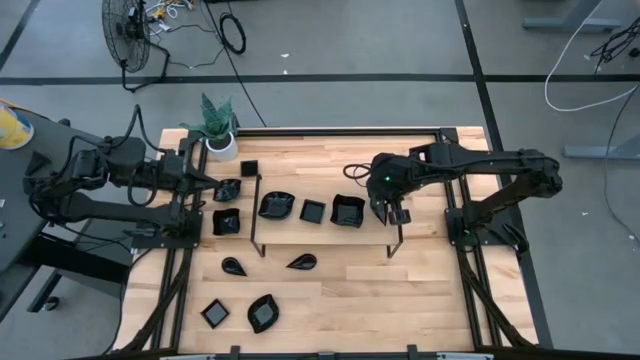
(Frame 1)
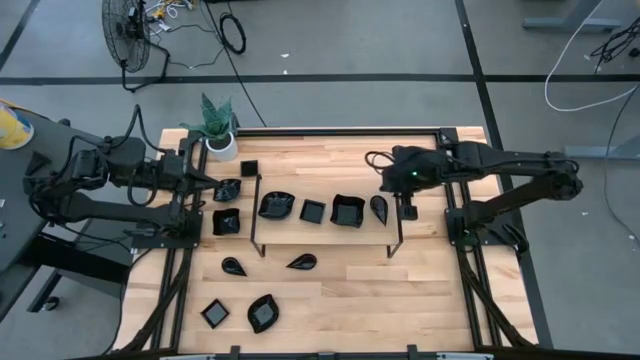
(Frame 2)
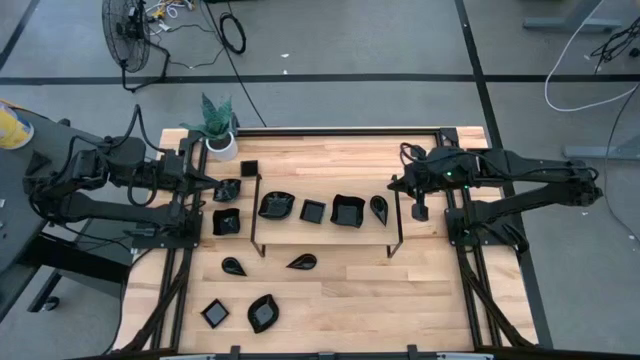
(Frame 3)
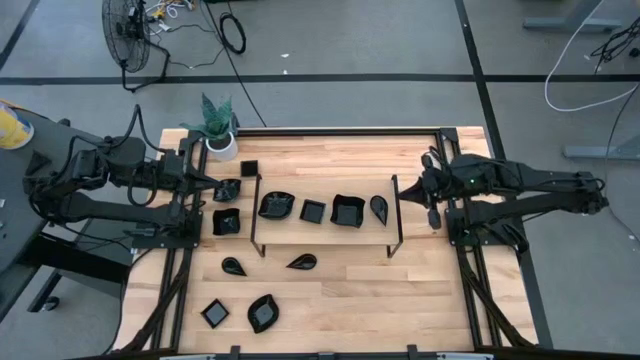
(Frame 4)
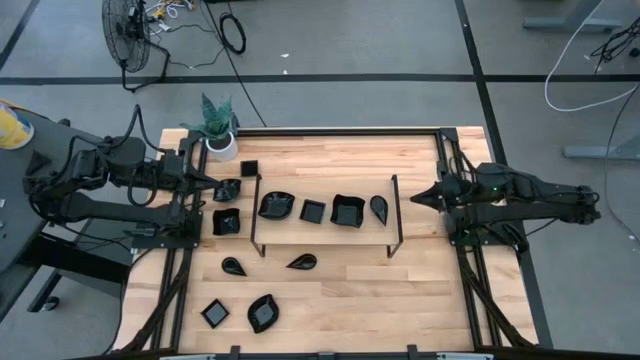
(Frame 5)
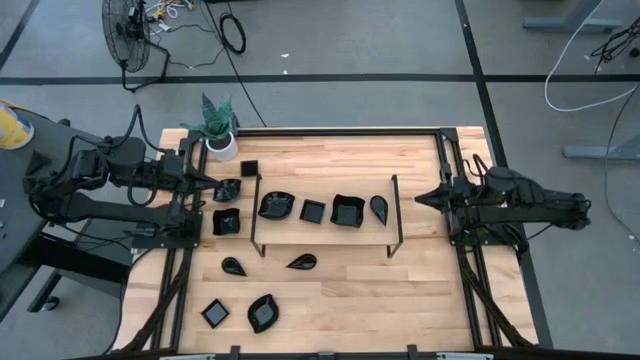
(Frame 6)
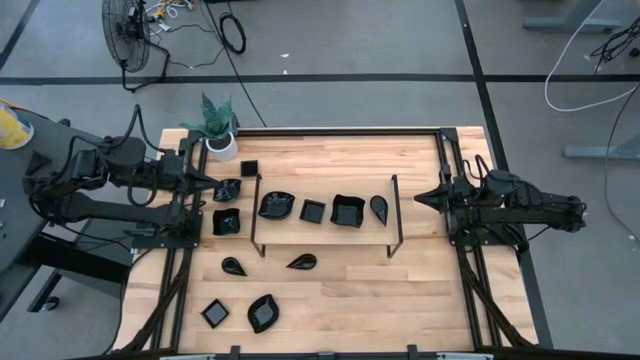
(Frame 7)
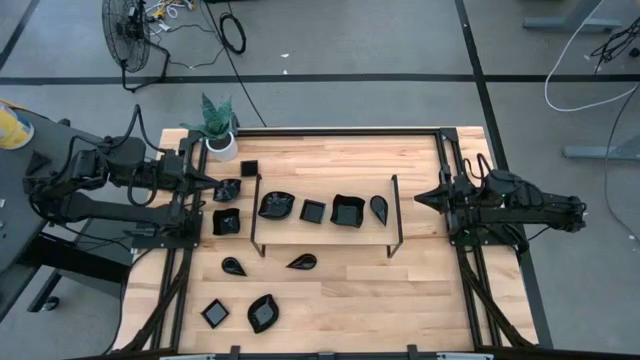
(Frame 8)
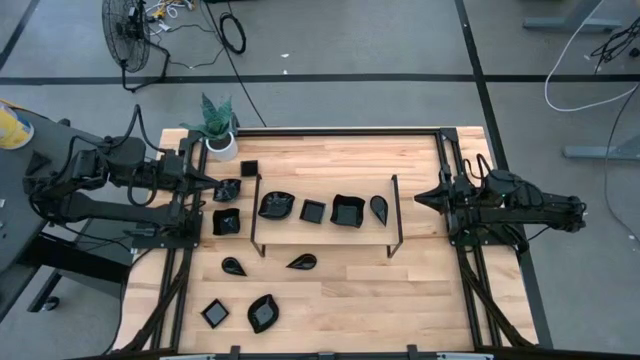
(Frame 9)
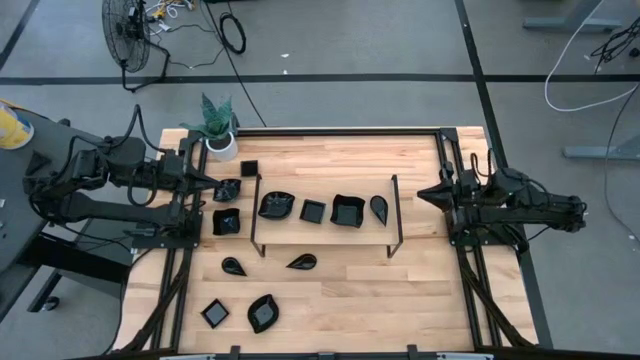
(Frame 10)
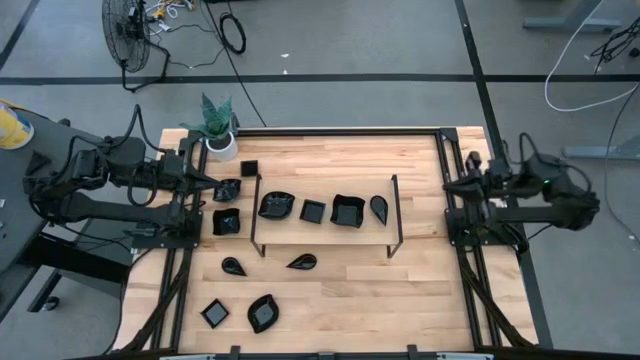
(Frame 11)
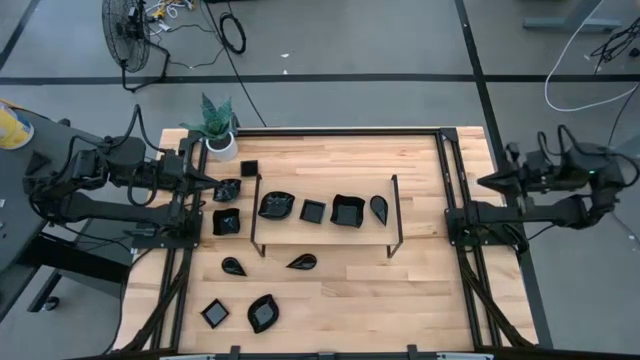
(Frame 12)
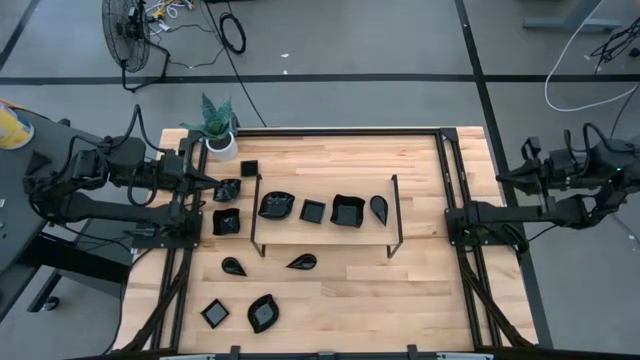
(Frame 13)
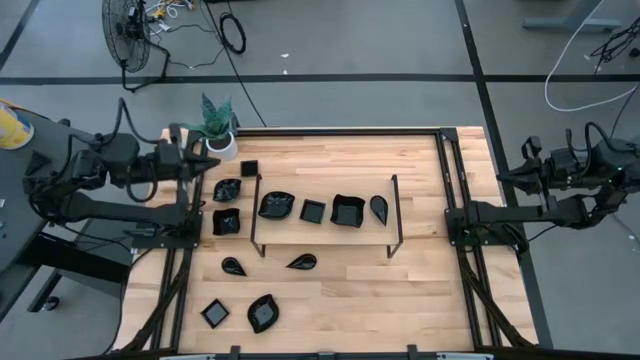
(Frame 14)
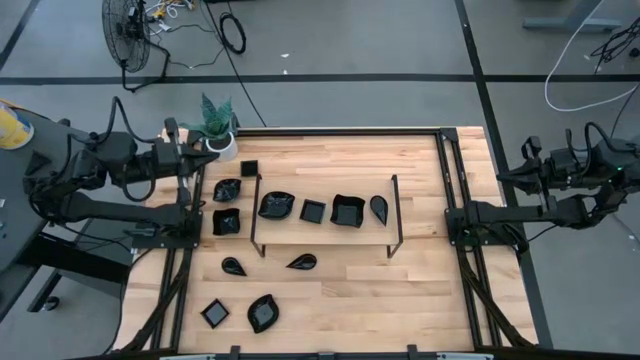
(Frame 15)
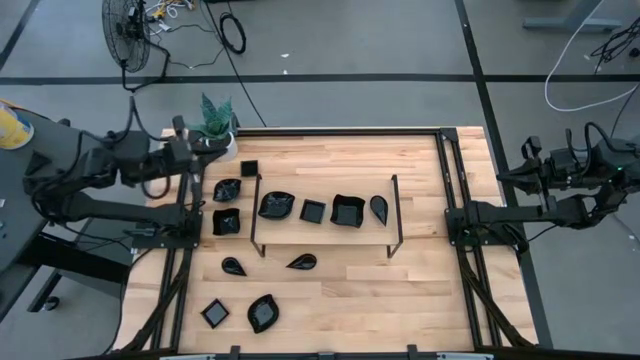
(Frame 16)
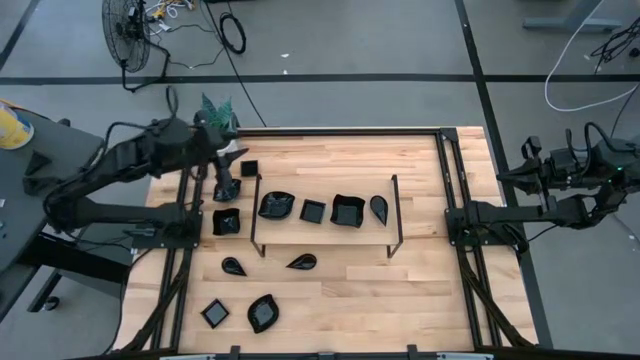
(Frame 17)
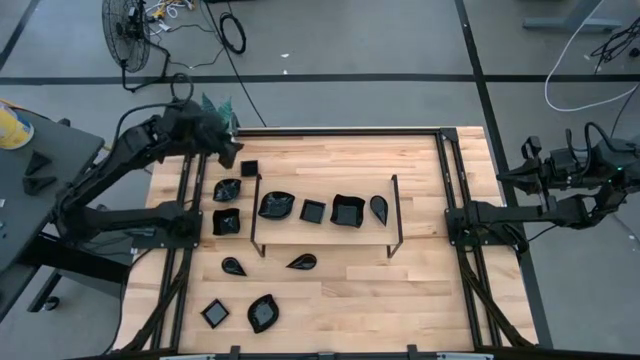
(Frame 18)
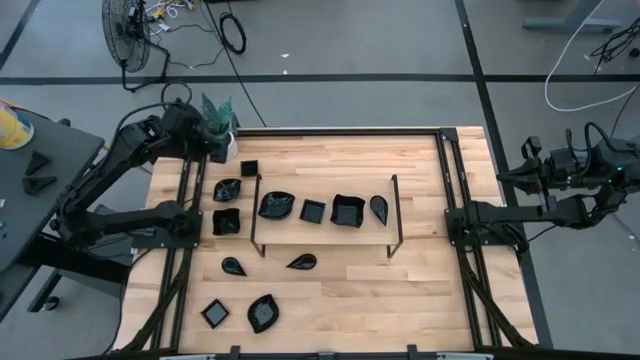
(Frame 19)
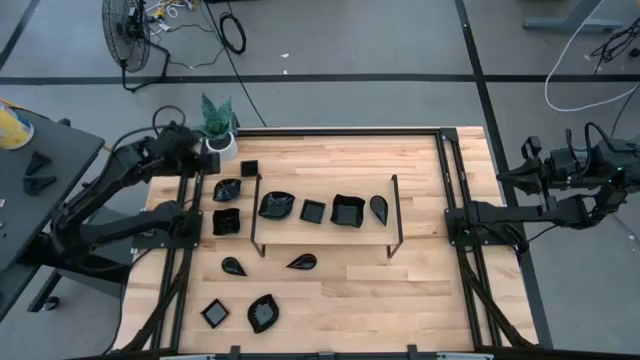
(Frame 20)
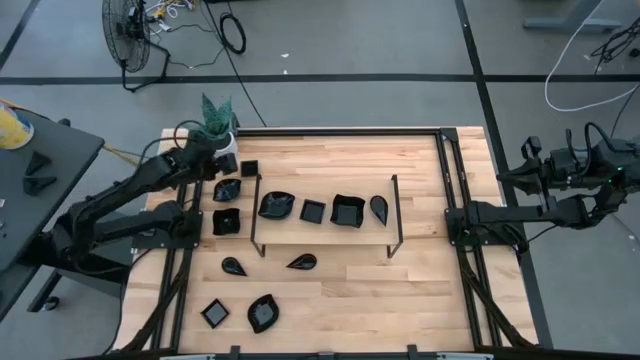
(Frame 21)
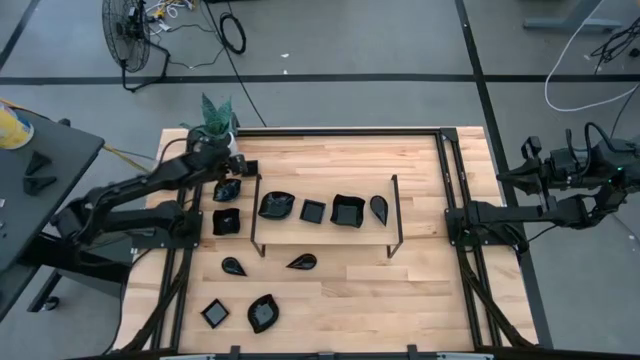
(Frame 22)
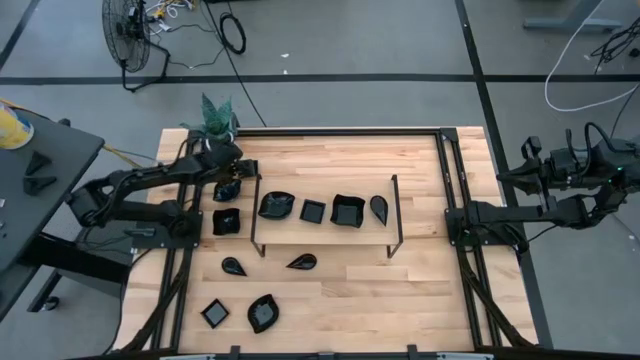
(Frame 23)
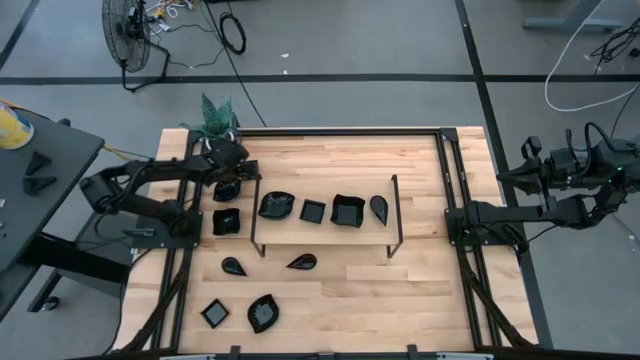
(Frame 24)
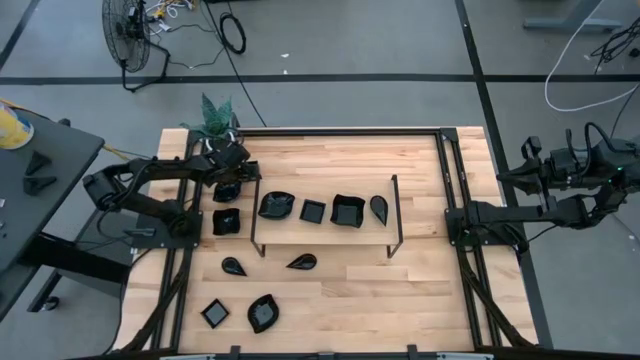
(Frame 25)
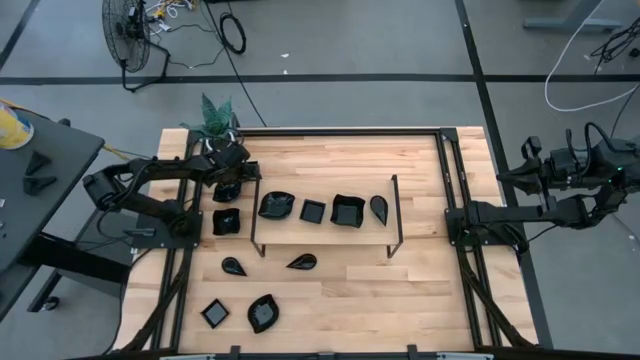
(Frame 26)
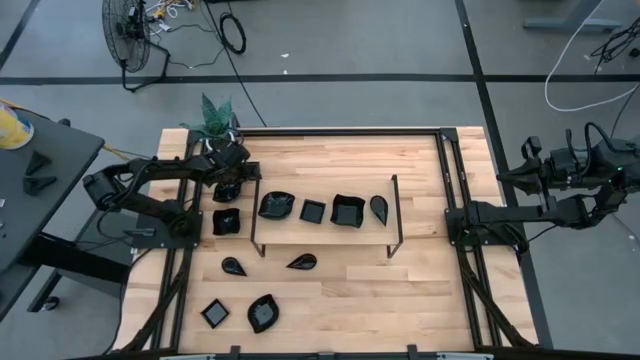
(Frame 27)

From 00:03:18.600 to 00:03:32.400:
Task: Pick & Place Mini shaped plates
Stack the square plate on top of the square plate on the shelf

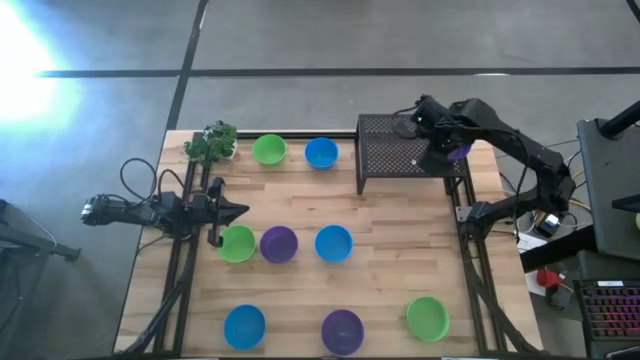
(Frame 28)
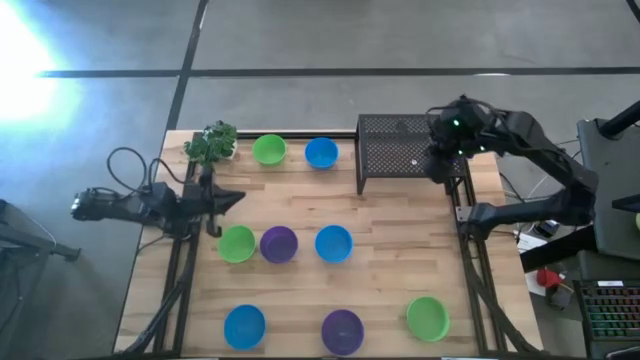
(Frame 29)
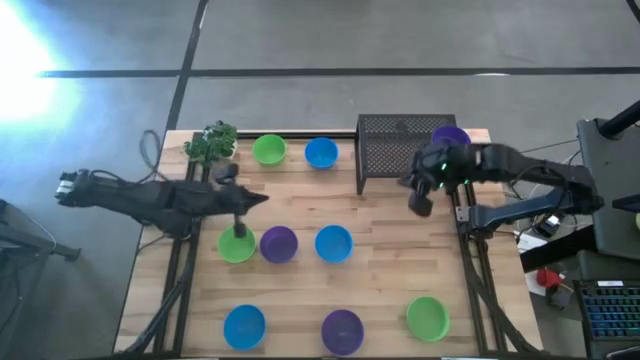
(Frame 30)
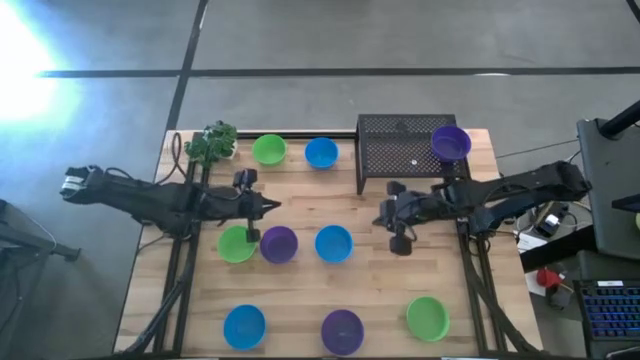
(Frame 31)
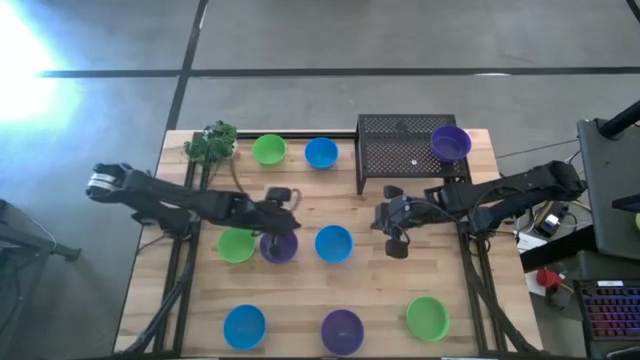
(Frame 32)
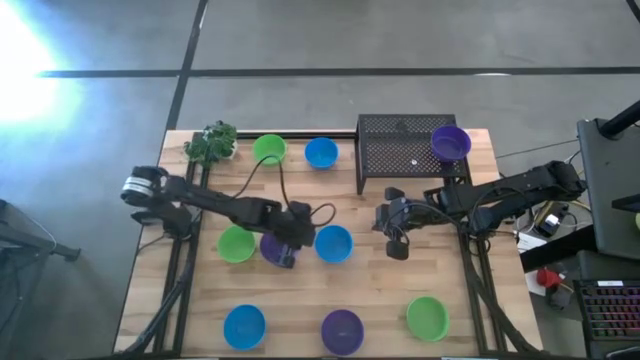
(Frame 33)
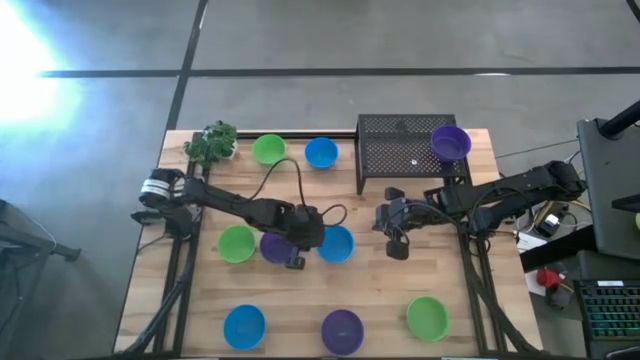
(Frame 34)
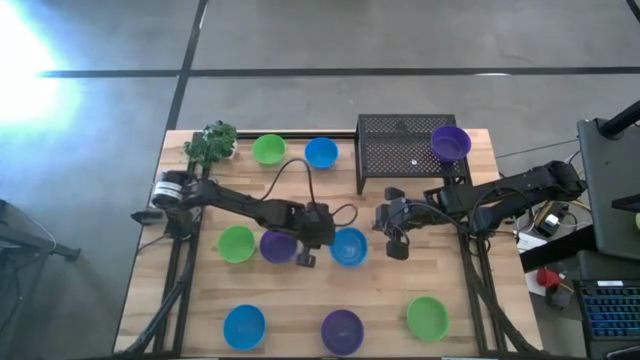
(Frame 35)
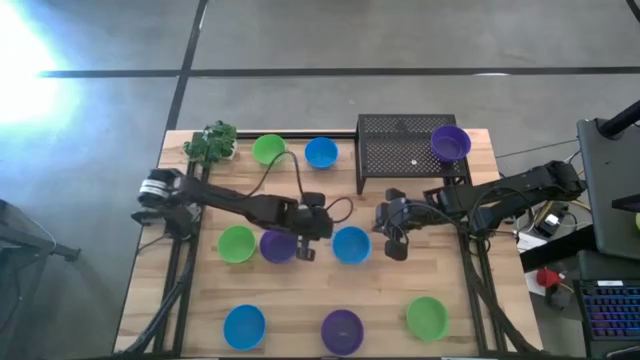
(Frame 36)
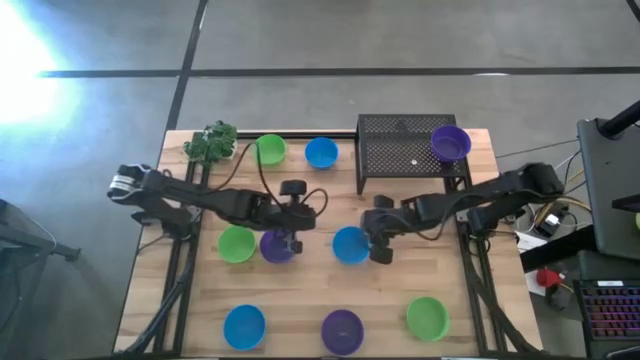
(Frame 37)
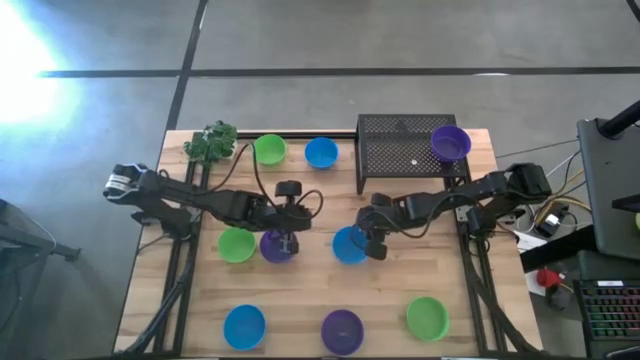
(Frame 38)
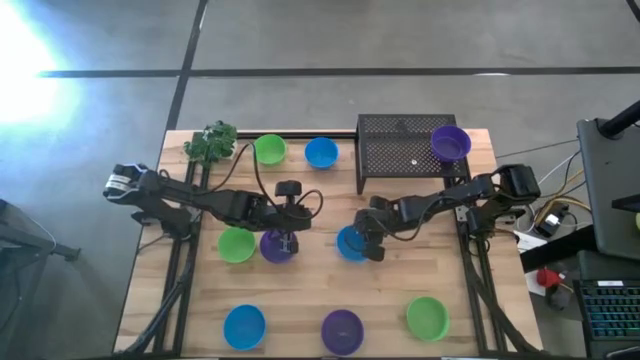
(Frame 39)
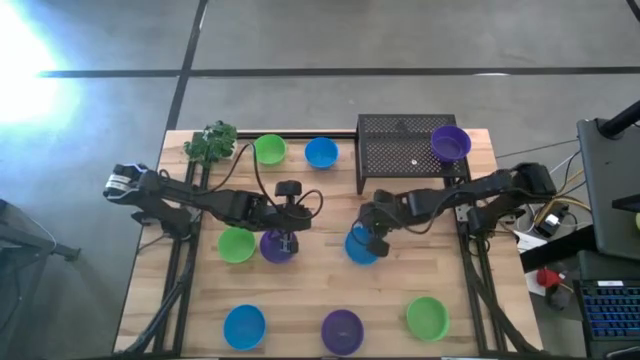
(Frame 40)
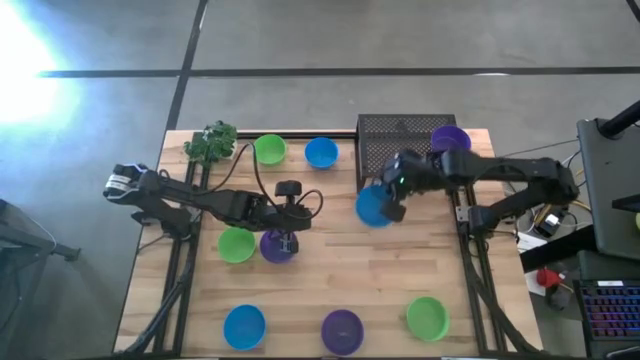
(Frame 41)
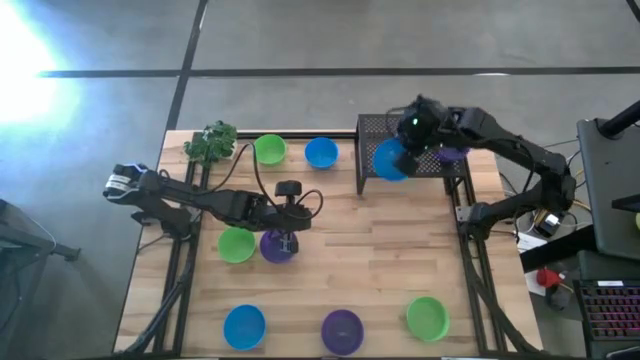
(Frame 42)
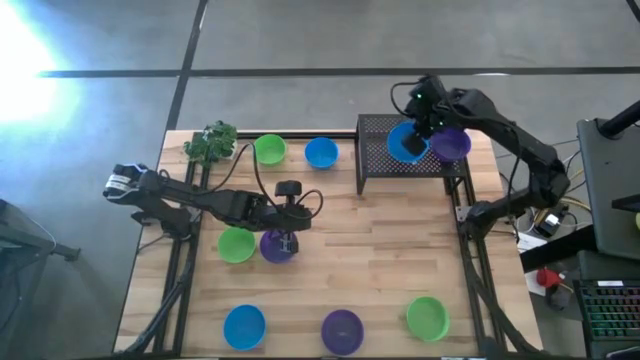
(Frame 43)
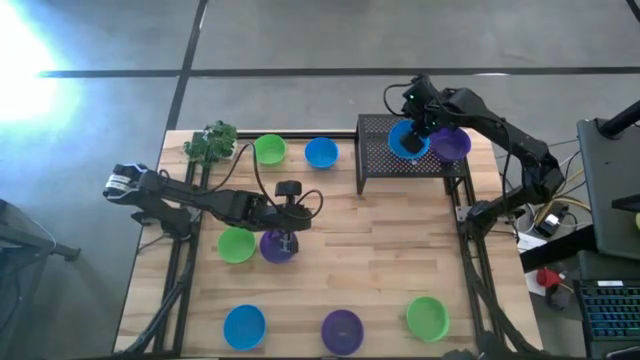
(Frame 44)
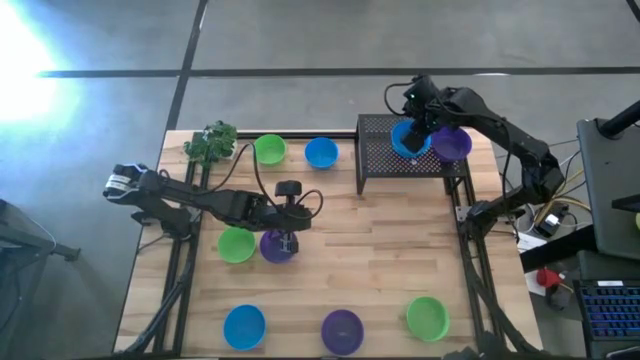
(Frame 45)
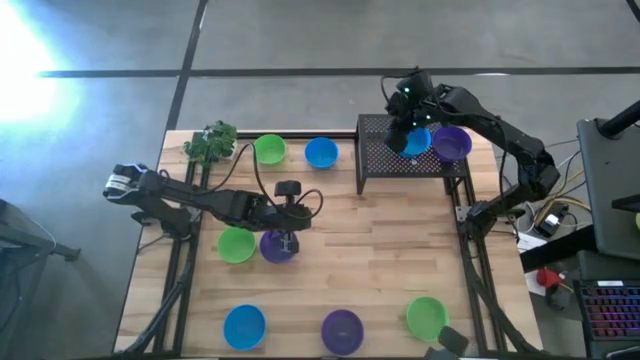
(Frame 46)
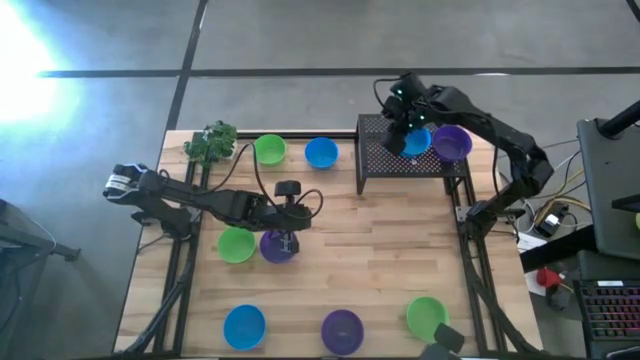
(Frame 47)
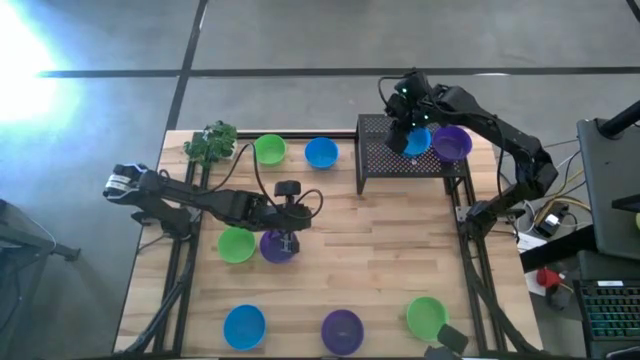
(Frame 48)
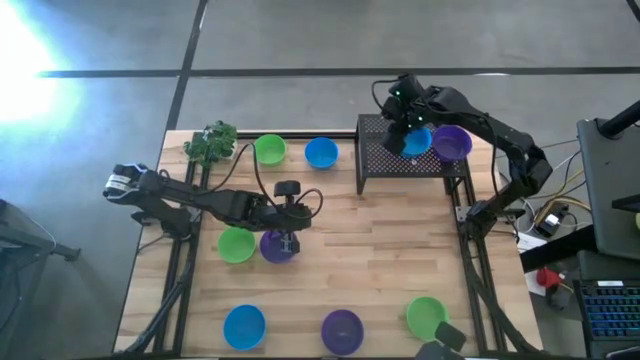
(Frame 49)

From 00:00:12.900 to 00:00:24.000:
Task: Pick & Place Mini bowls
Put the middle blue bowl on the shelf
